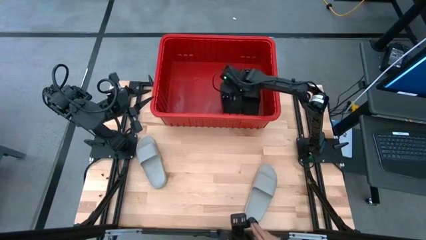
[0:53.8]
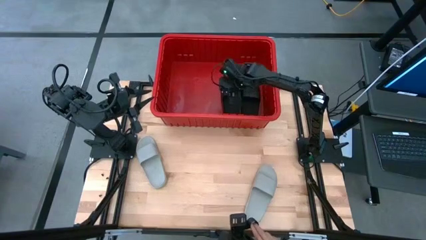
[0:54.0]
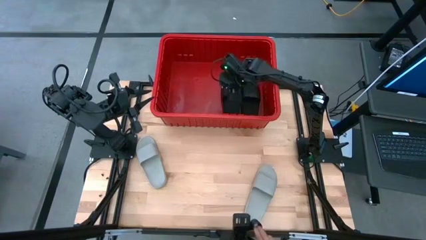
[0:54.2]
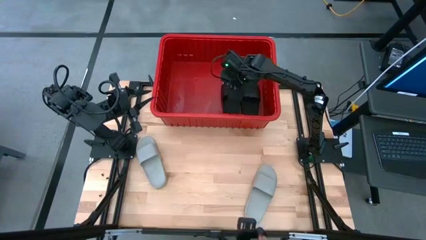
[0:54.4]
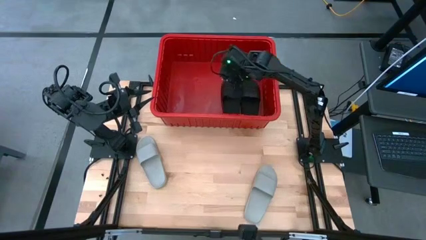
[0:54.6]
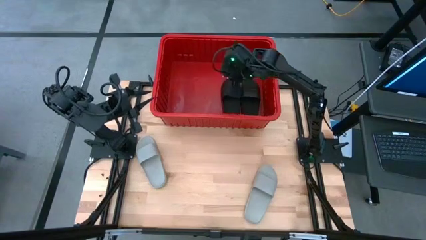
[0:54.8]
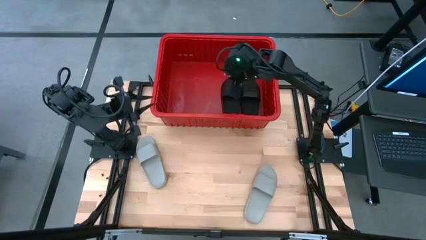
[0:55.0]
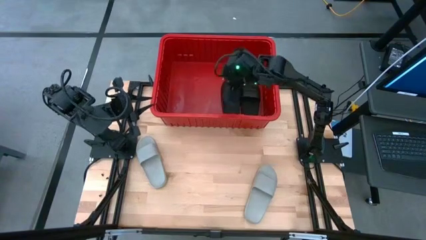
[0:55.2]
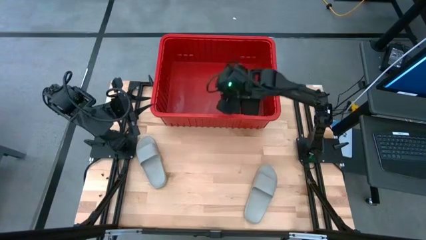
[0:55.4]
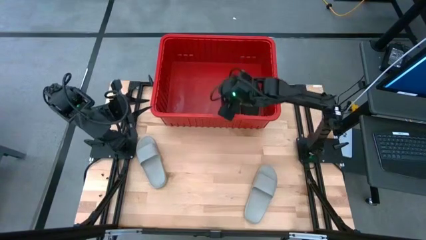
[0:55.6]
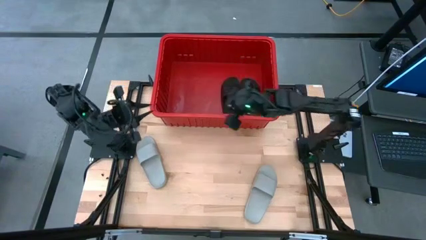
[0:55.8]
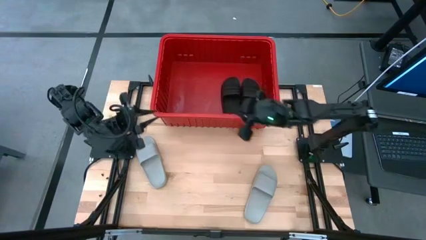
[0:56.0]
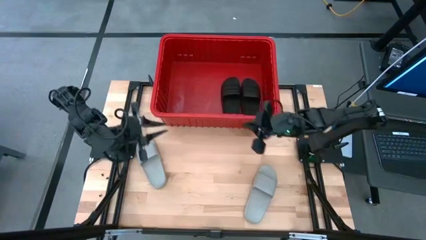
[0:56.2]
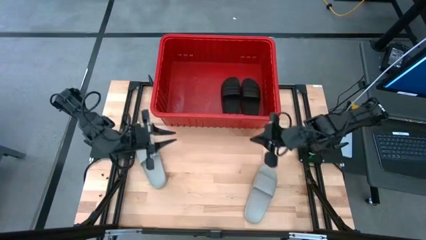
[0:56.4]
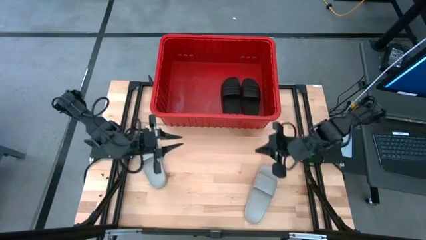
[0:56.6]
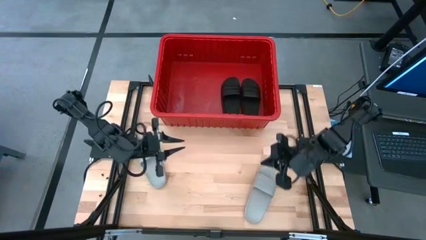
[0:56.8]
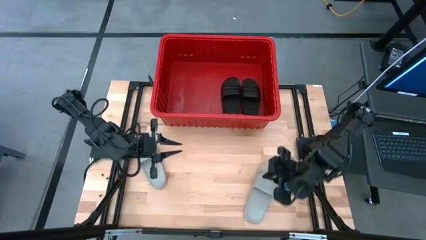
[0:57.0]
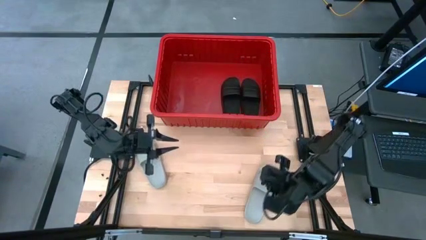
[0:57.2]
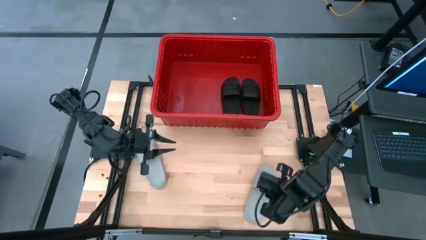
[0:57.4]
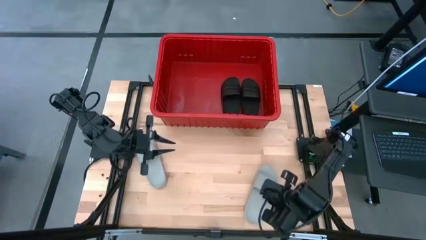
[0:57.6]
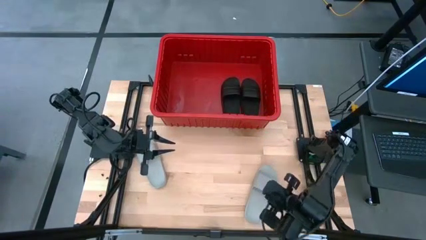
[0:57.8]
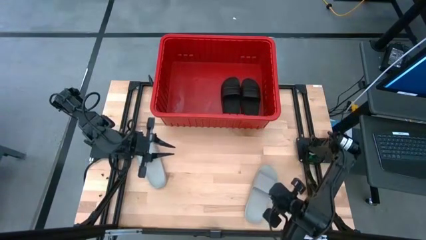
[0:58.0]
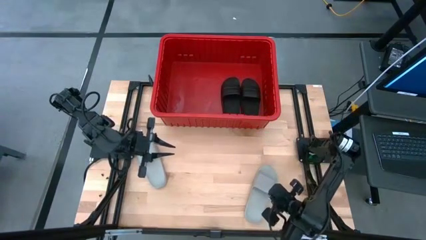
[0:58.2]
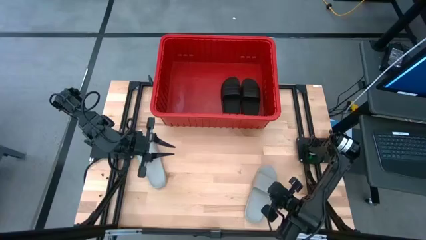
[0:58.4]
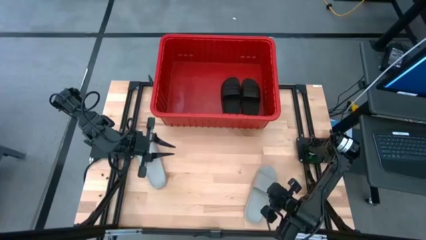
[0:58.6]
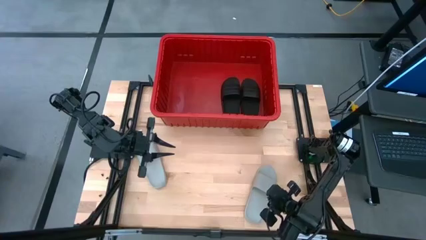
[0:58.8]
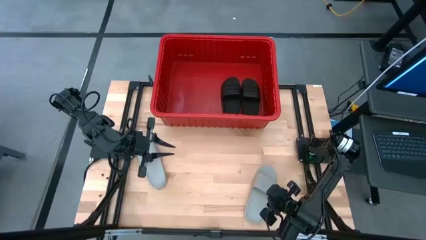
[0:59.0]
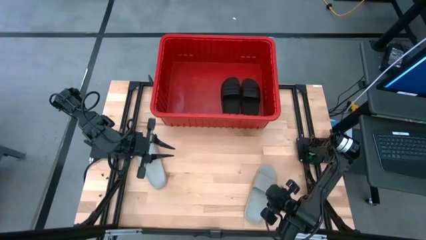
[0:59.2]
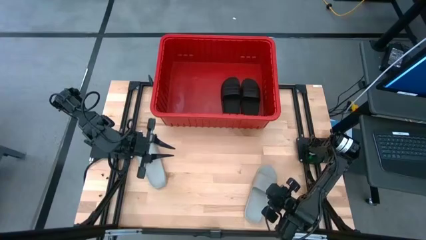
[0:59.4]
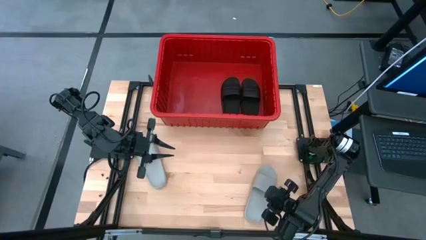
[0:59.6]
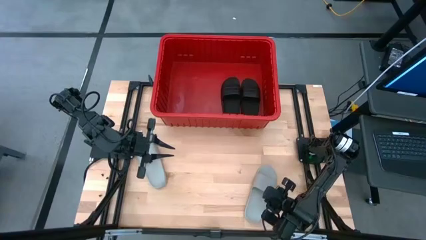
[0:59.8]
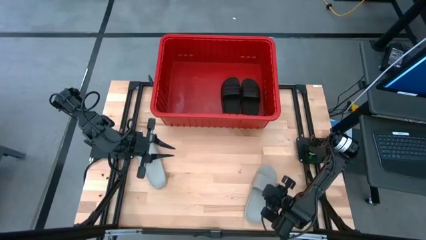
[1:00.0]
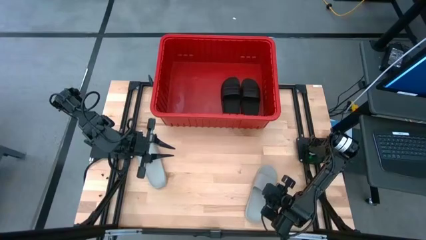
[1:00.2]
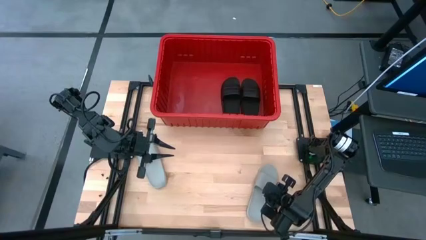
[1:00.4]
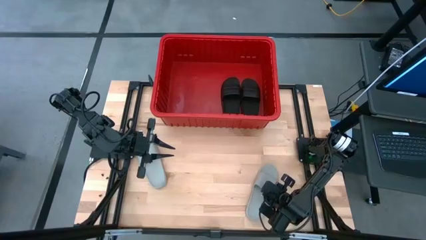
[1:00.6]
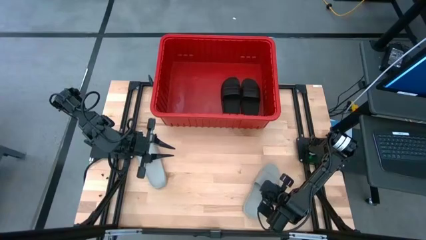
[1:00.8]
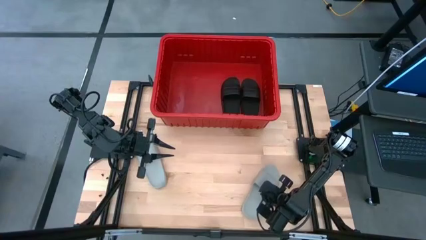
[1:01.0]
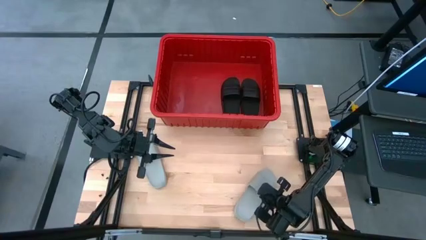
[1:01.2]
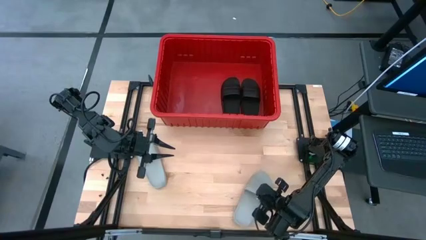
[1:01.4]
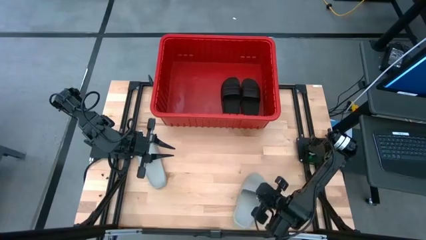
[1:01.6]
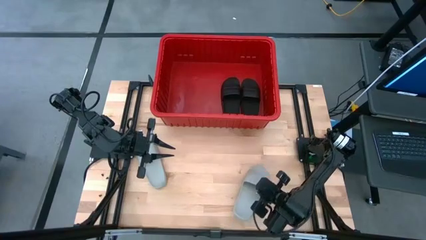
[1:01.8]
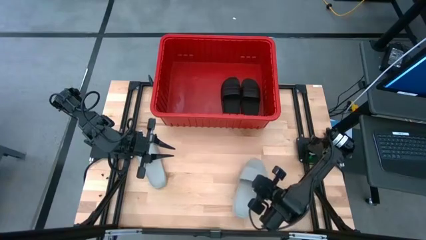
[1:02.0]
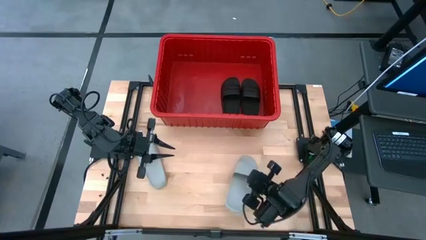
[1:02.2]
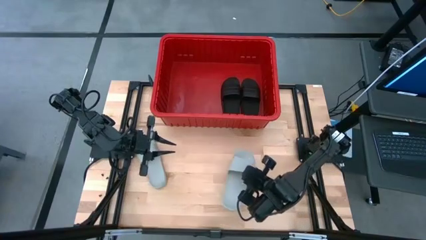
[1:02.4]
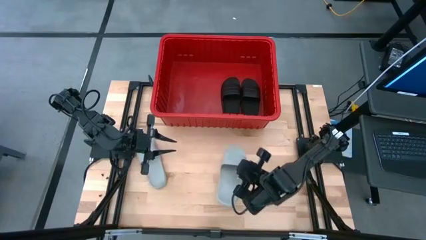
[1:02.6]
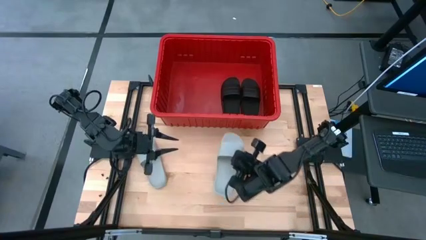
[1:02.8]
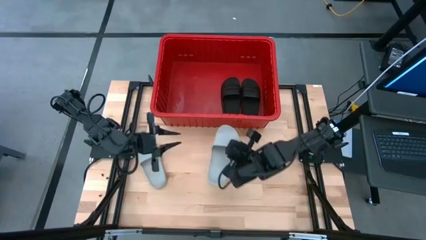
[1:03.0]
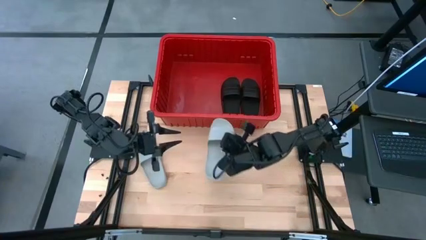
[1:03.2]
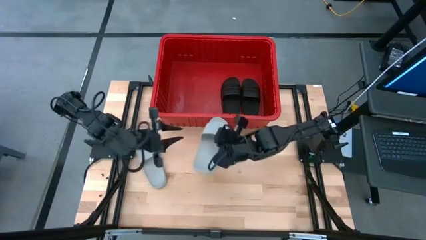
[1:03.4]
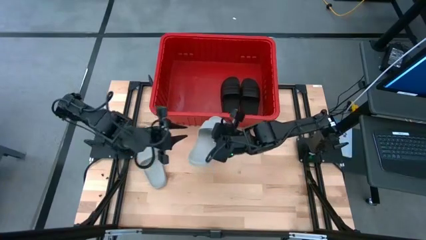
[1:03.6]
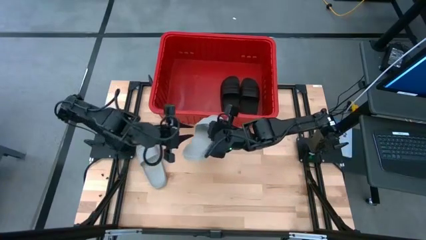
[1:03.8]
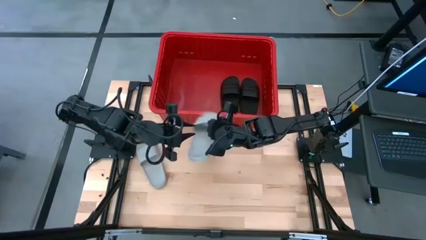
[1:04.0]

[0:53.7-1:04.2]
Task: Pick and place slides into bin
Put the right gray slide into the red bin

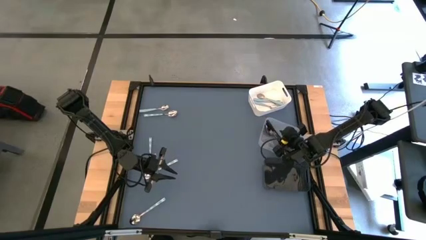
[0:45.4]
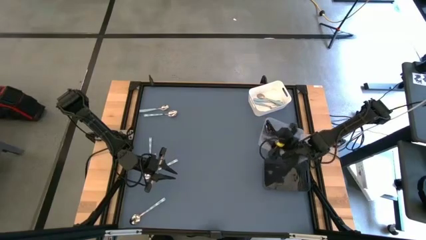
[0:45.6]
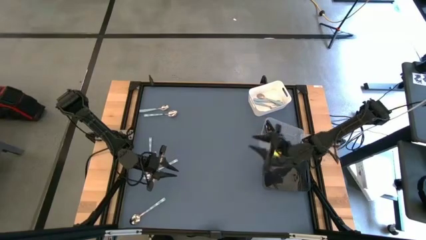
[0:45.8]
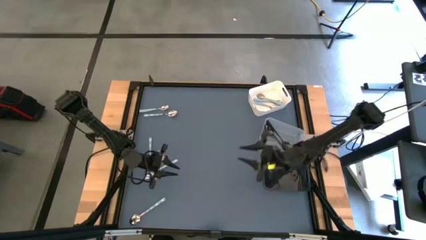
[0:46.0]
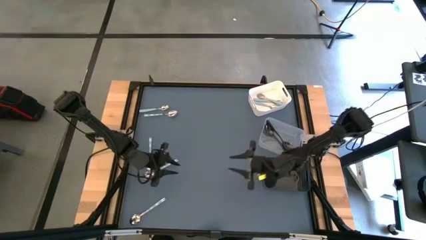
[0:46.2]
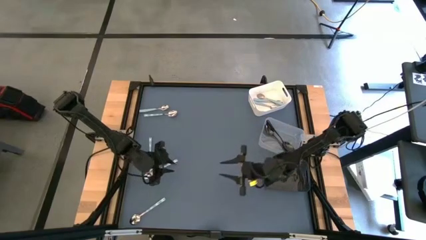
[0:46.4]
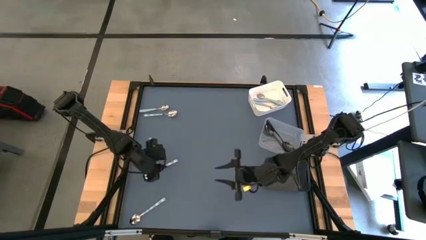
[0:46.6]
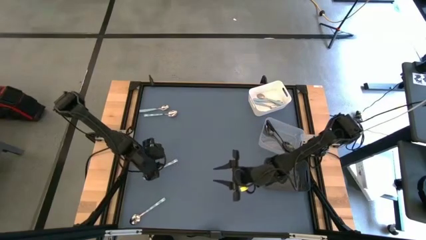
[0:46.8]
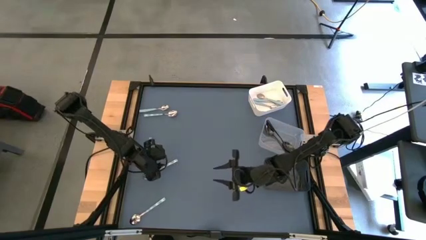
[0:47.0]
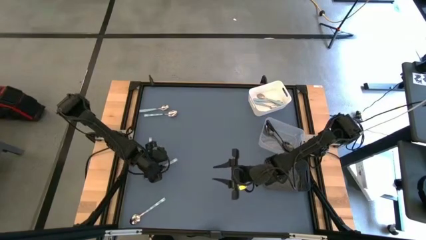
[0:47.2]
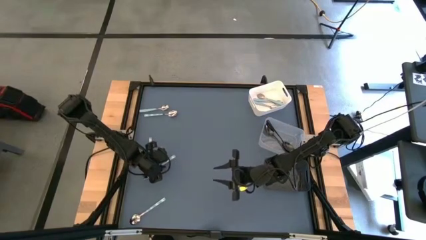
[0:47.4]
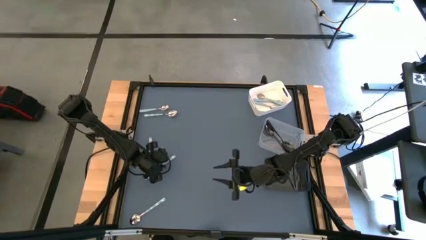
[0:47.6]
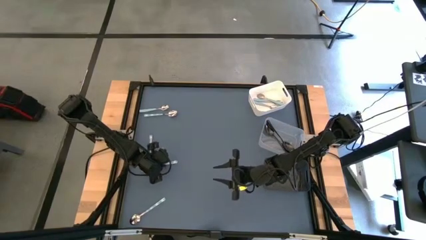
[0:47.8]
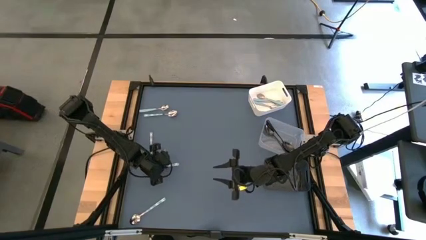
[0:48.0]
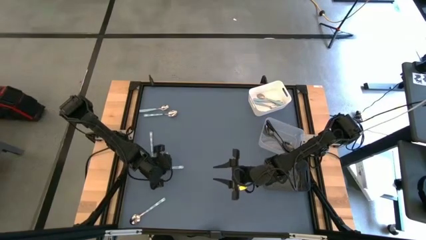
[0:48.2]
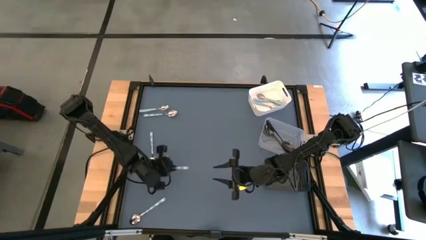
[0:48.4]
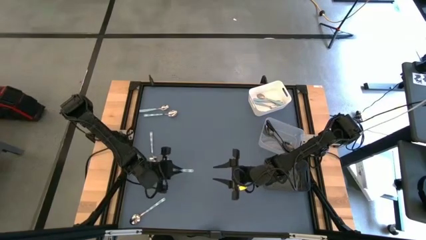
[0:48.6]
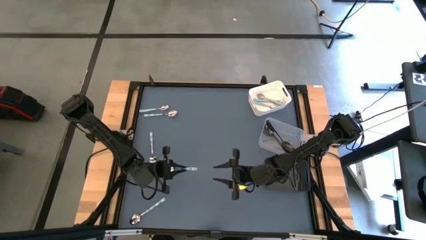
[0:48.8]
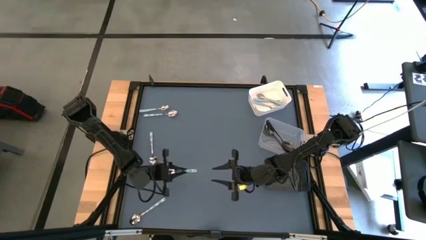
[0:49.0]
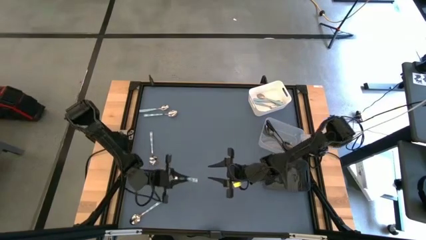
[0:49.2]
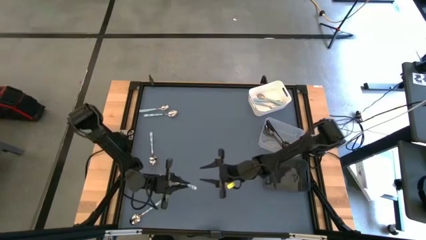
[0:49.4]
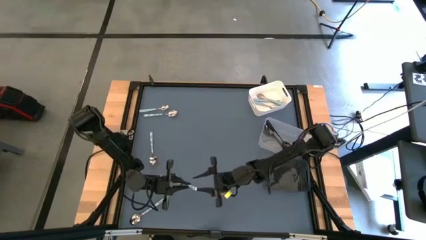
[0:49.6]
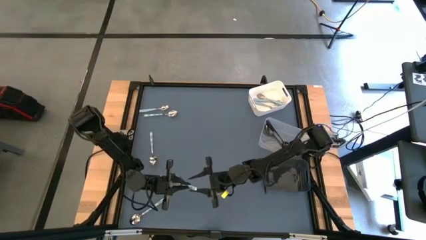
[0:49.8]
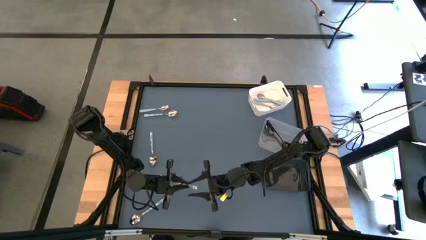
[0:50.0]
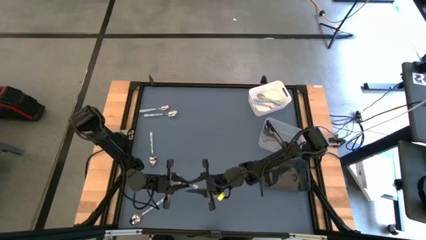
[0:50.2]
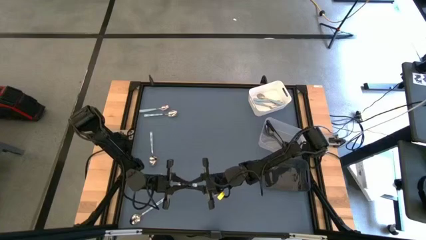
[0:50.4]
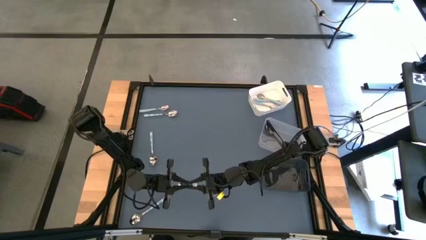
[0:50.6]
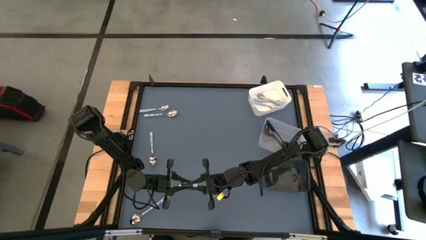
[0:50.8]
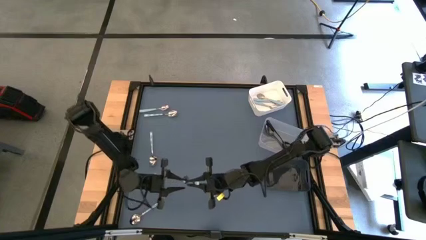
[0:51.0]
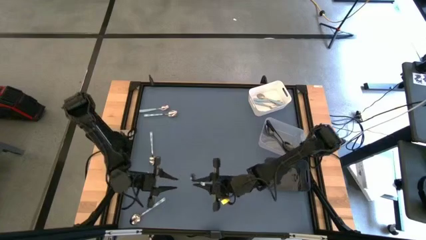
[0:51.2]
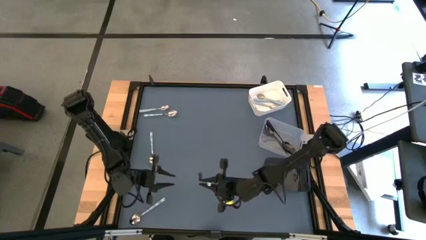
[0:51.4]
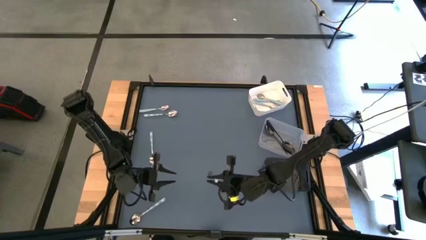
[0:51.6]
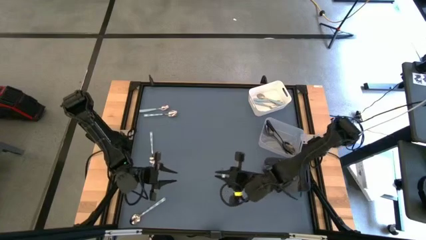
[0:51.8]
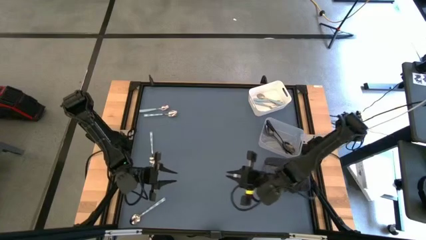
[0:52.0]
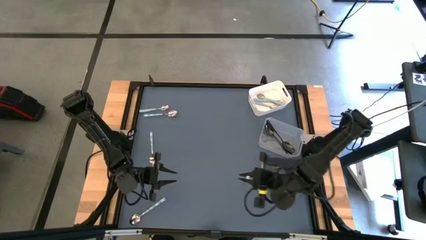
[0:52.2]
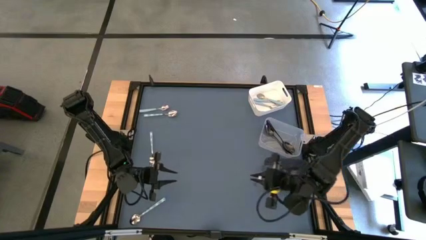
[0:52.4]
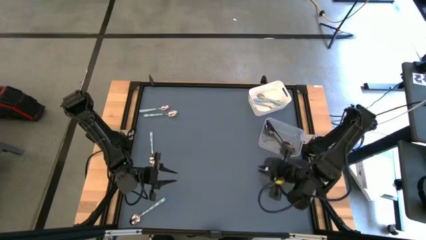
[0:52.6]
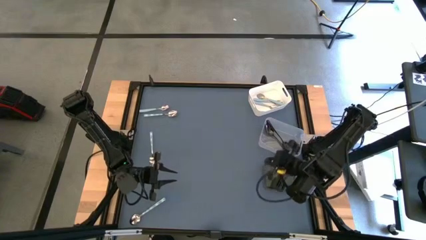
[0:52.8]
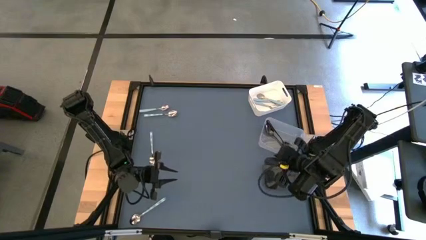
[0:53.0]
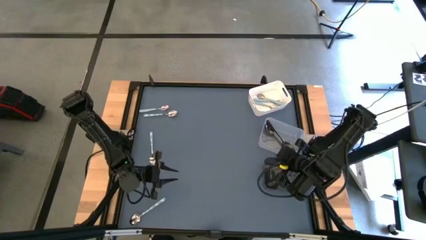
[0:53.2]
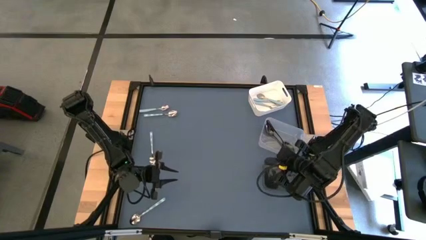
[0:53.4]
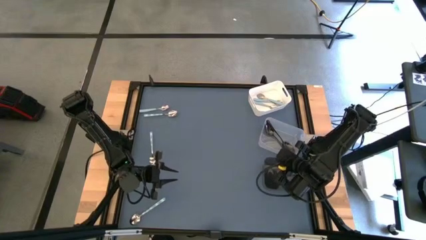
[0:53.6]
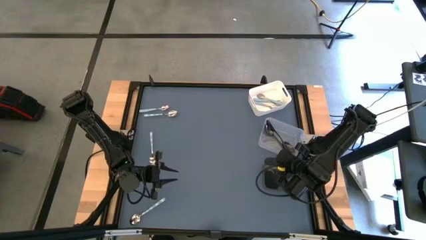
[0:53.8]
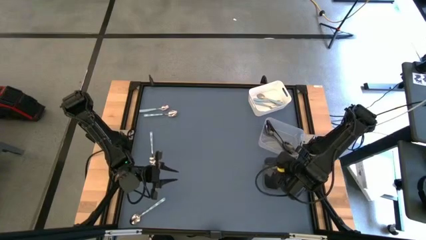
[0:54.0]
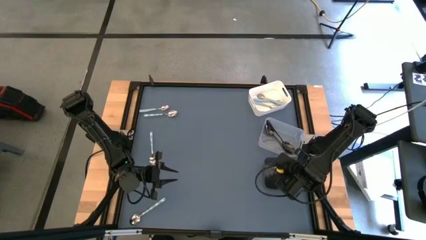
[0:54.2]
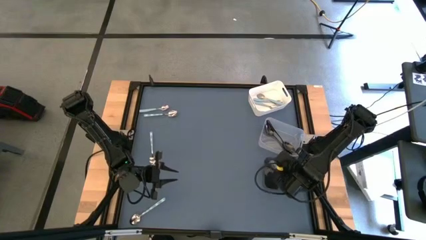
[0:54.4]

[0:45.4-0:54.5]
Task: Sort silverware by color (type)
Put the middle right white and blue spoon into the black bin
